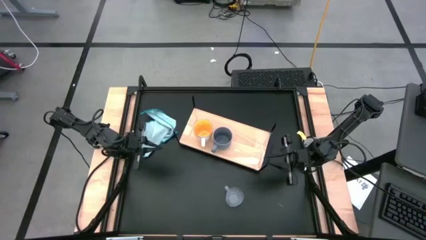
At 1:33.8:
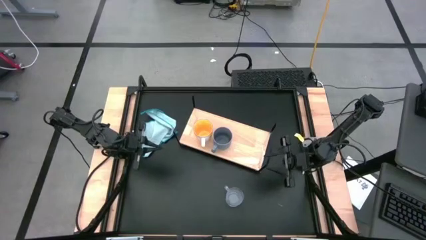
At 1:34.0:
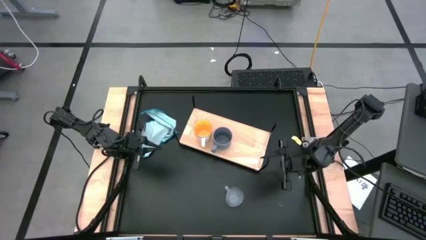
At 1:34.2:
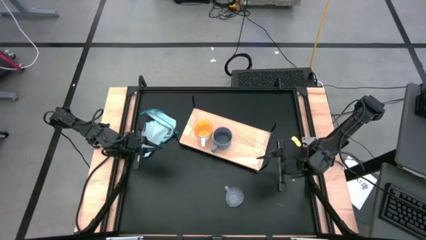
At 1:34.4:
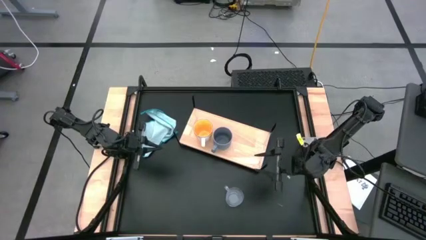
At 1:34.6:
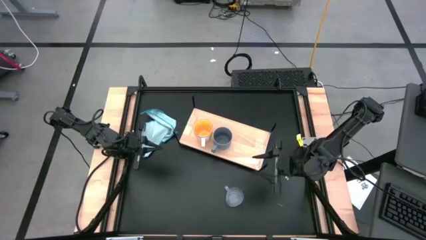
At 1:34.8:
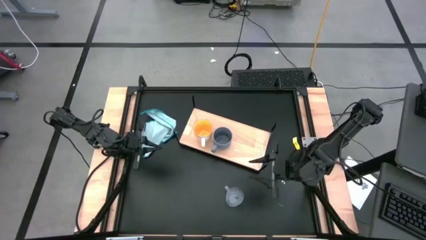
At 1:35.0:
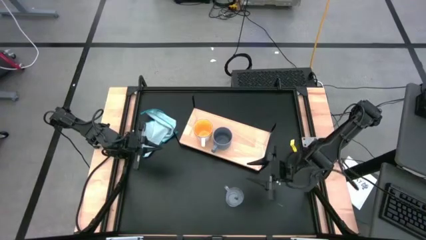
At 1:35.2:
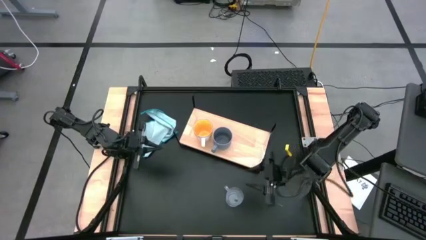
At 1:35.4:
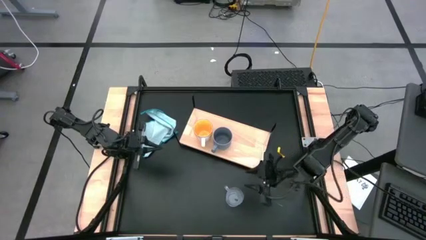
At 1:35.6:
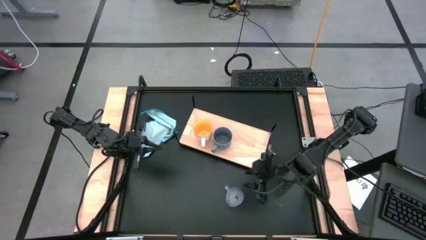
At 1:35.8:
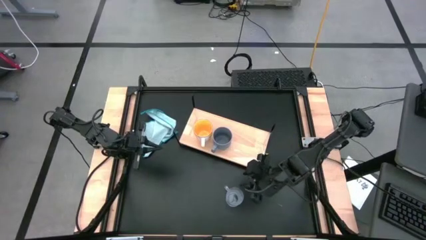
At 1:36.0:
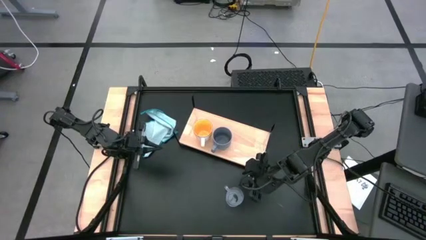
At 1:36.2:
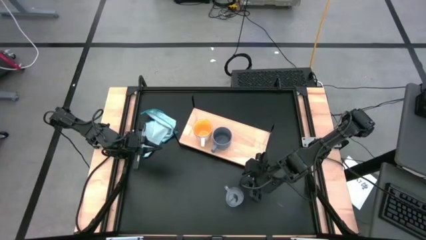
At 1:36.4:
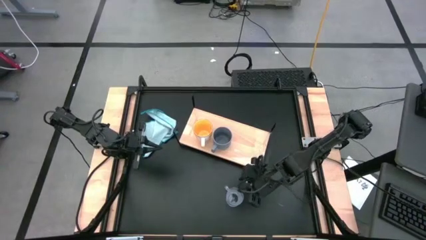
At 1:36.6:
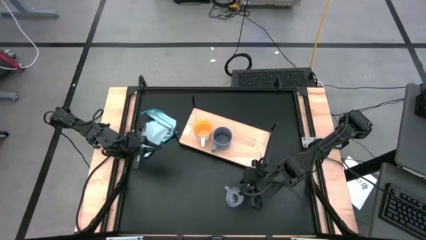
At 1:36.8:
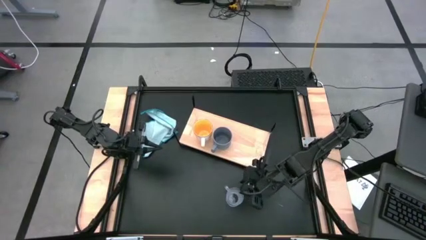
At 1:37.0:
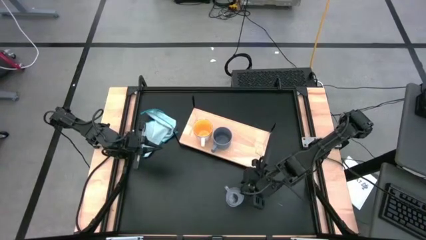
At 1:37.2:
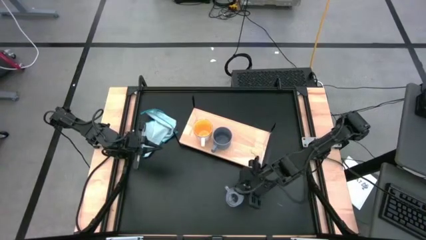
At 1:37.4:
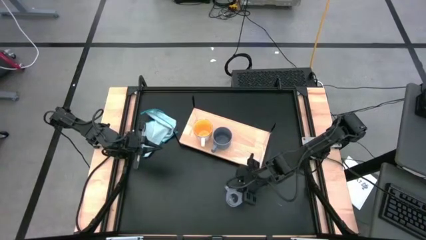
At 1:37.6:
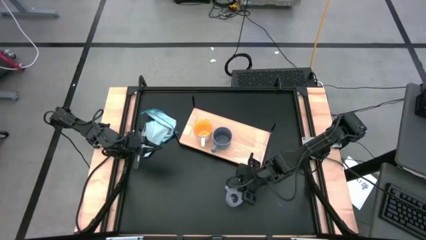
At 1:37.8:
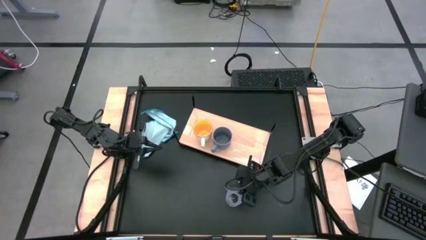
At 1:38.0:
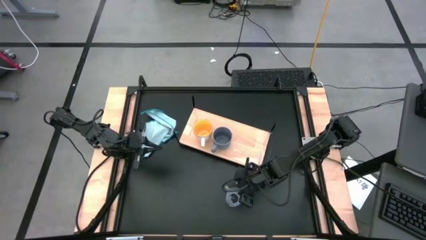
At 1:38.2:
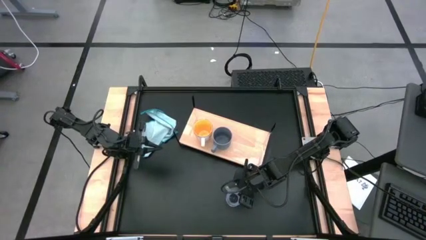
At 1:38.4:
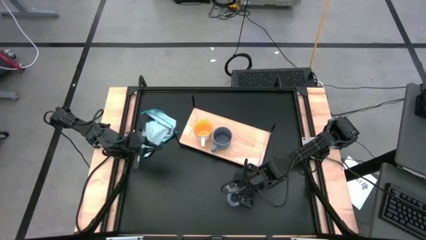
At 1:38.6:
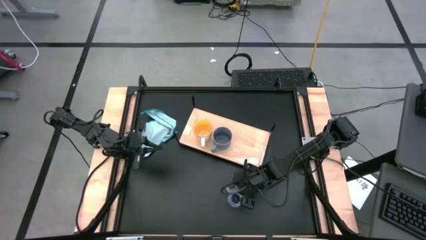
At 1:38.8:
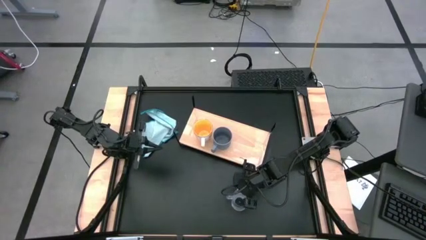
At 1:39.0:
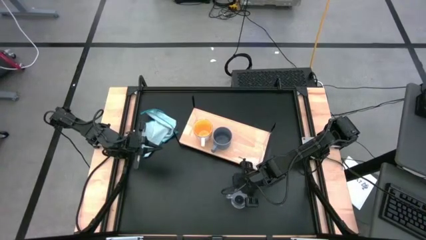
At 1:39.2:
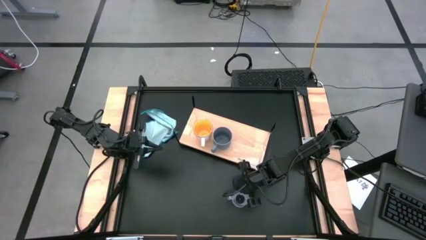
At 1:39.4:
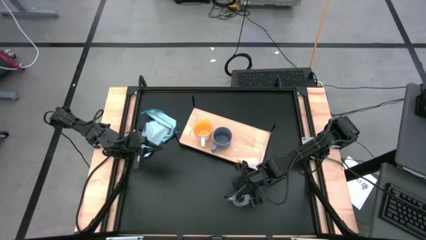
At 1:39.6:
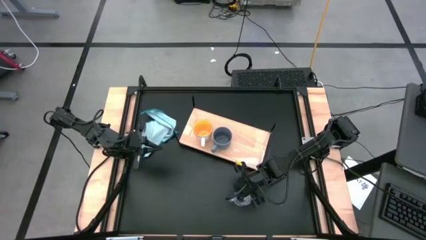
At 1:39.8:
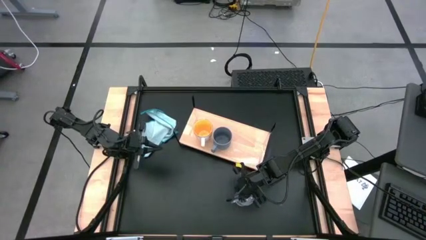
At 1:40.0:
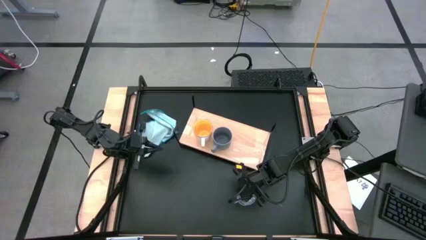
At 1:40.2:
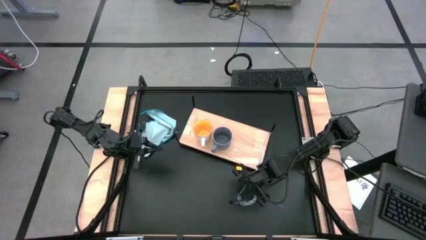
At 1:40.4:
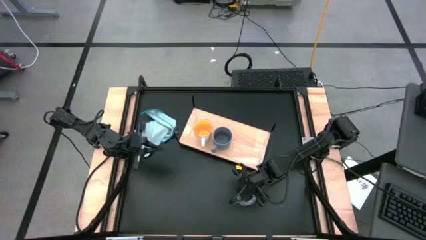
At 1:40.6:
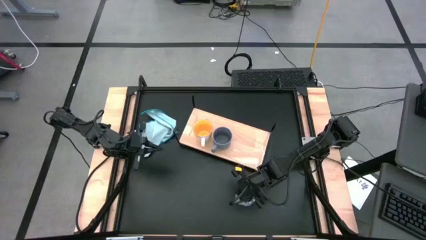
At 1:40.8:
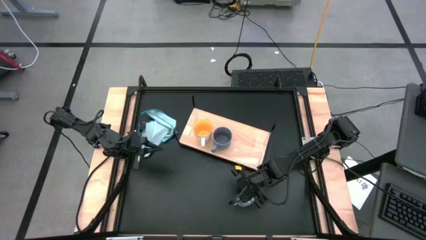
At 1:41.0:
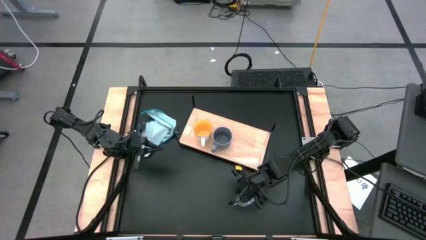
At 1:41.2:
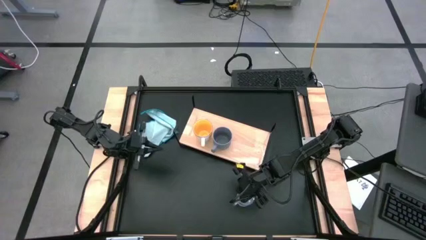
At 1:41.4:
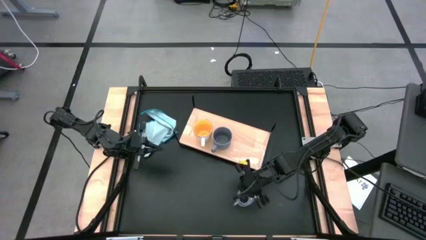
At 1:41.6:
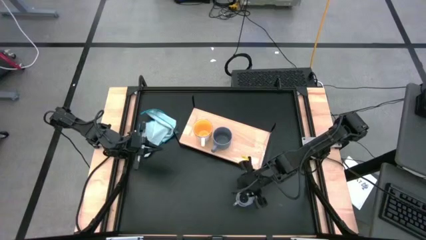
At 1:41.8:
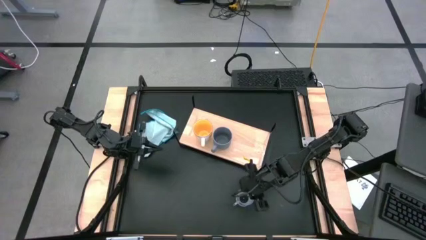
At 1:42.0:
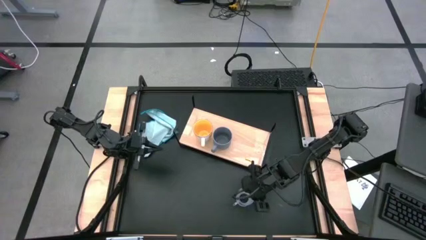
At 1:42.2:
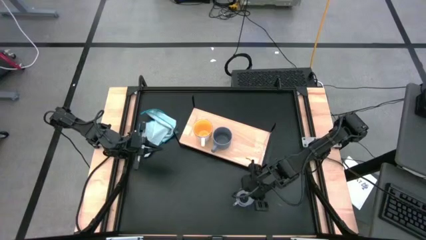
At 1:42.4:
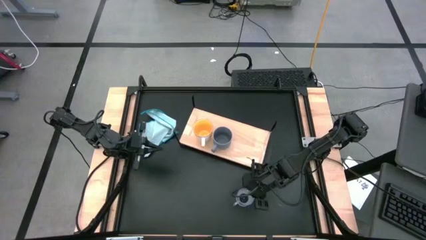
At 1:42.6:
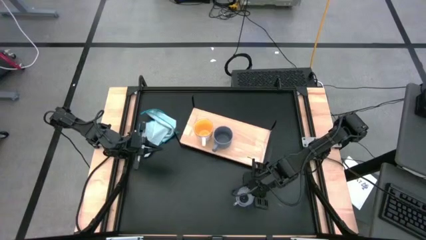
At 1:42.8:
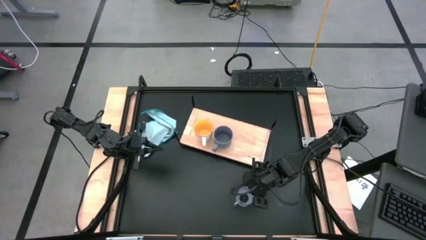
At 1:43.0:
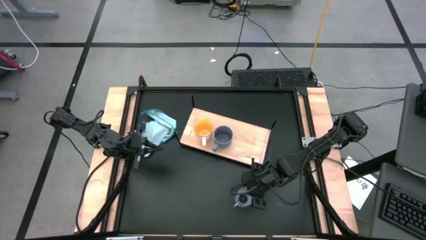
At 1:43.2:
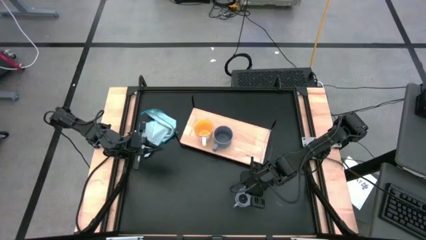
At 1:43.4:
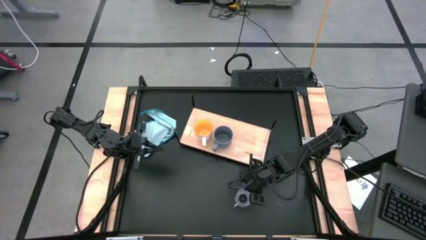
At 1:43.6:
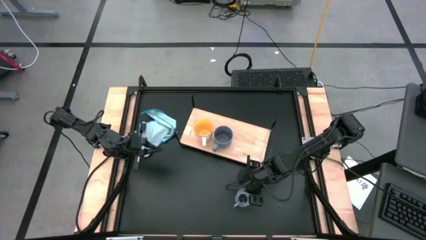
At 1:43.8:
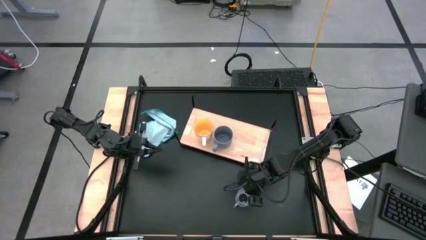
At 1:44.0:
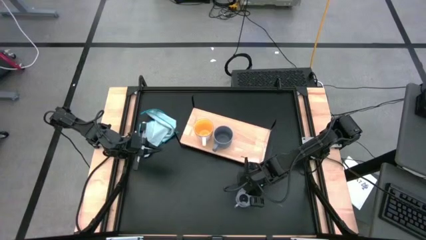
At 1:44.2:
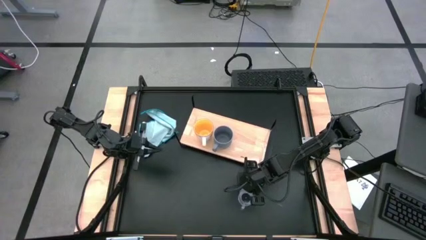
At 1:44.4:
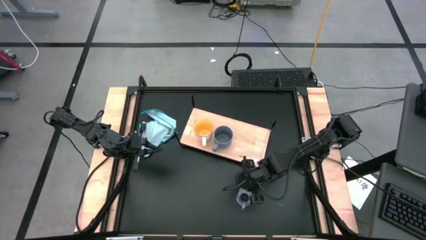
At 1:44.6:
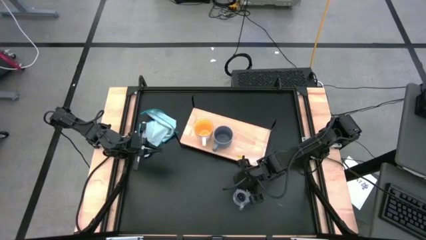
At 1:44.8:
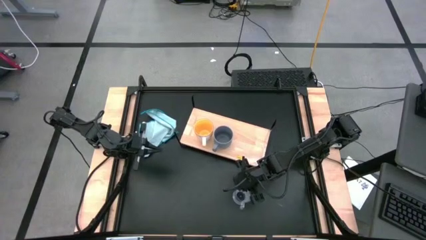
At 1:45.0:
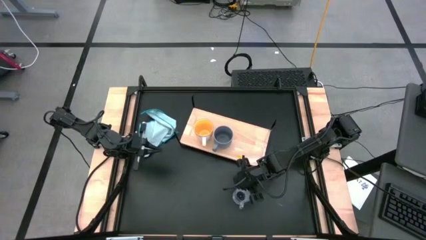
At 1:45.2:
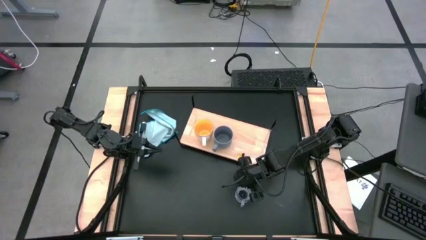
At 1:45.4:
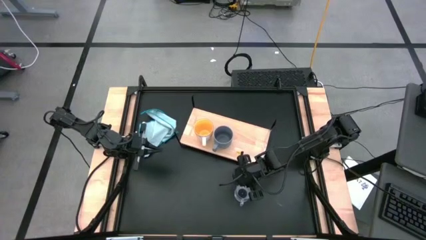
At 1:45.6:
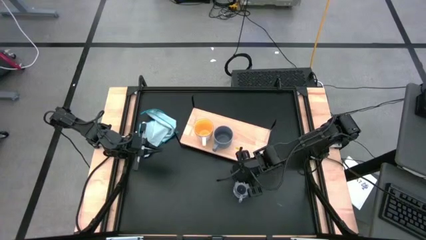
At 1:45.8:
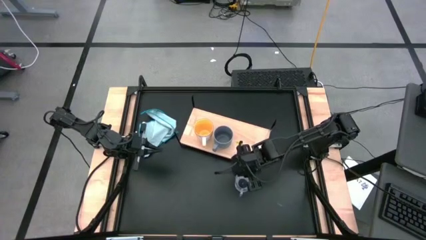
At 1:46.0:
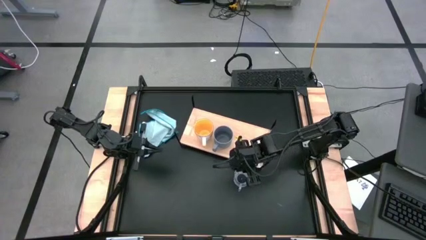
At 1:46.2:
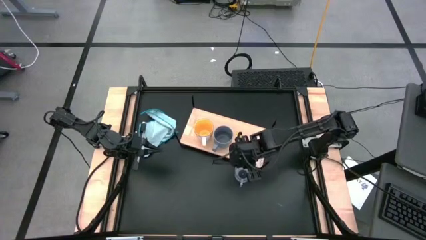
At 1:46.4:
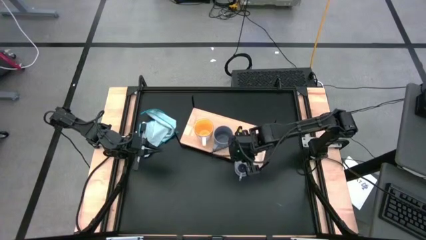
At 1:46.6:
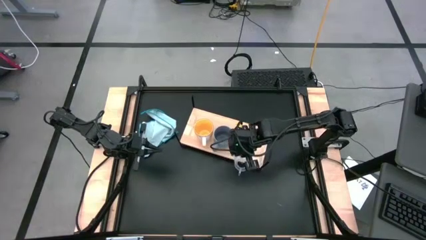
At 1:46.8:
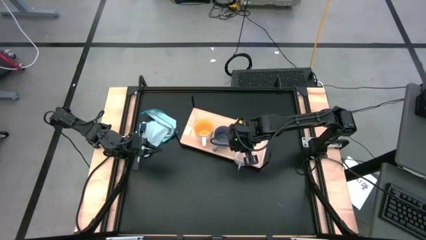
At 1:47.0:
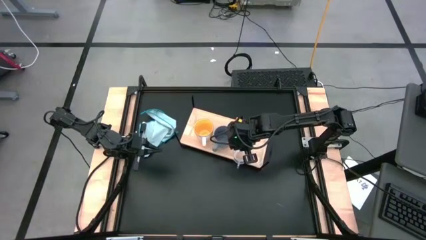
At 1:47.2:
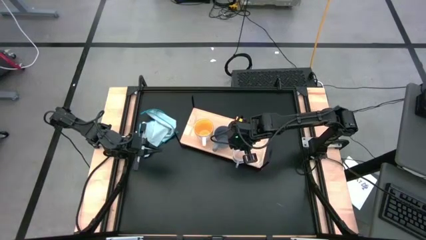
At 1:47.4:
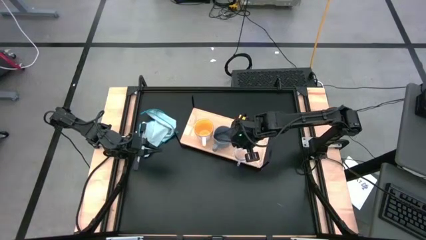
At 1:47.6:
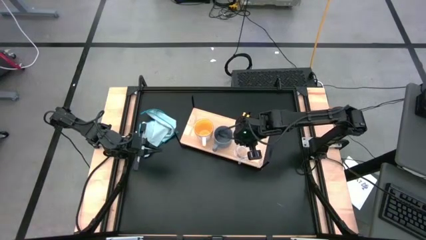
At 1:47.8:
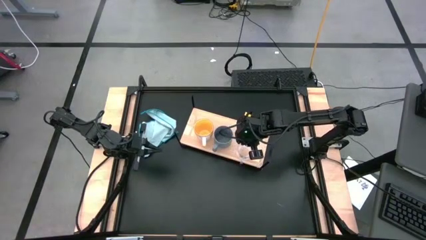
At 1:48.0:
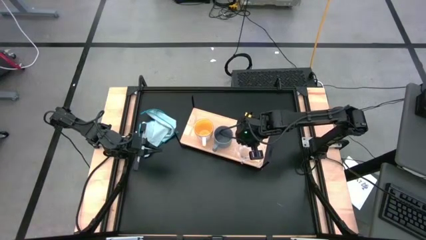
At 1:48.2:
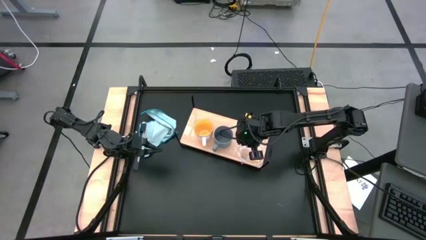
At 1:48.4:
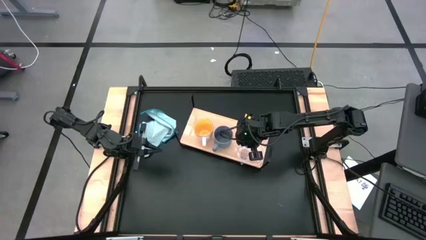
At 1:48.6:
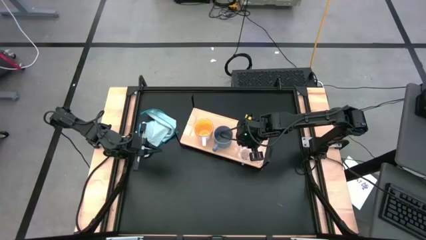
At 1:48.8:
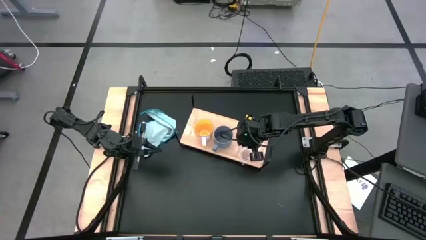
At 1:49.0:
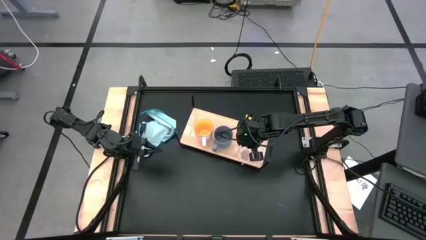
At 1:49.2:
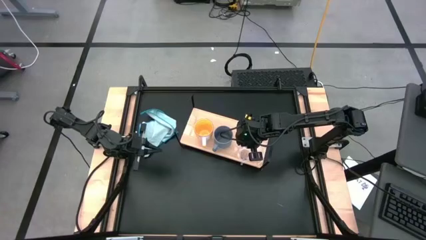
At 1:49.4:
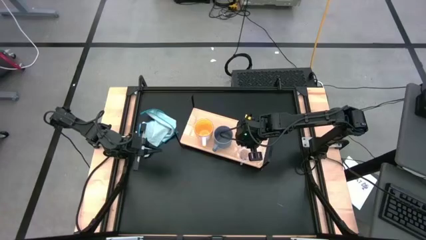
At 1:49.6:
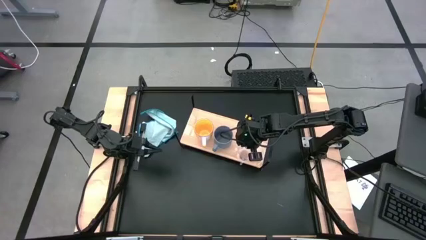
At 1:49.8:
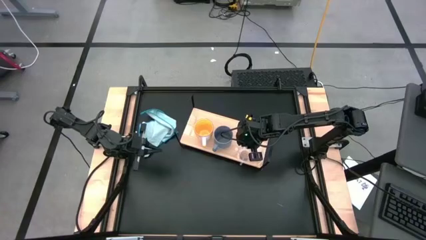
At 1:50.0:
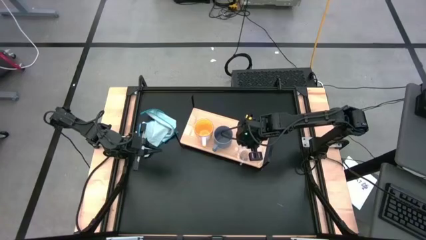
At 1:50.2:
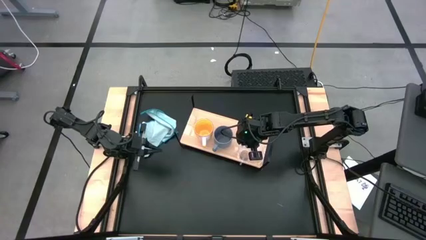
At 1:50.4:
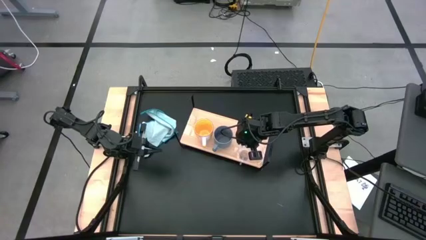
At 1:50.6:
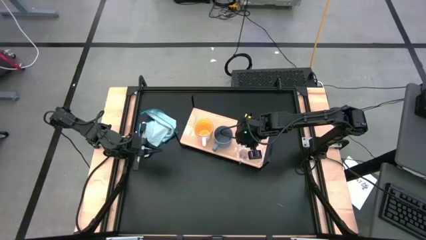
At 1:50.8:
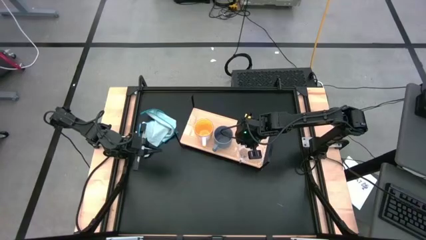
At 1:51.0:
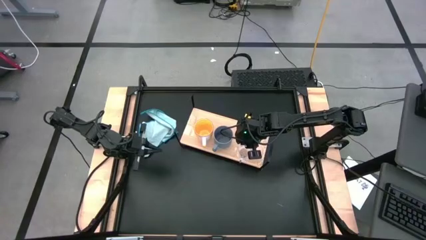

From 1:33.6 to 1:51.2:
Task: Stack small to large cups/mugs on shelf
Put the transparent cup on the shelf
